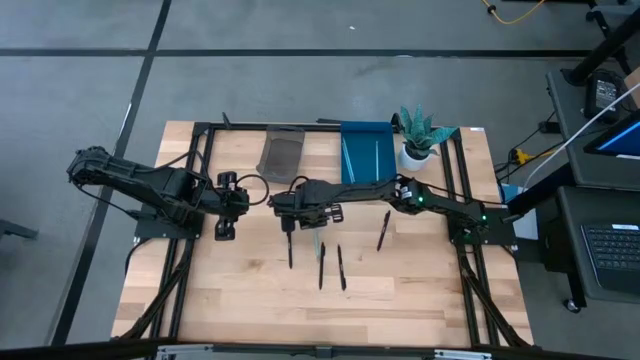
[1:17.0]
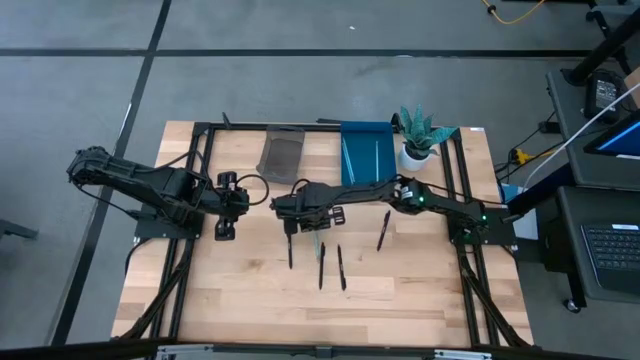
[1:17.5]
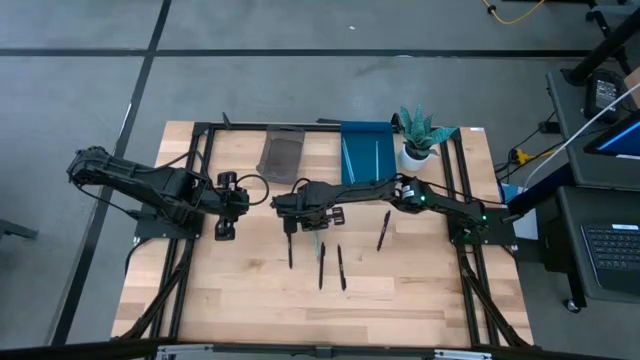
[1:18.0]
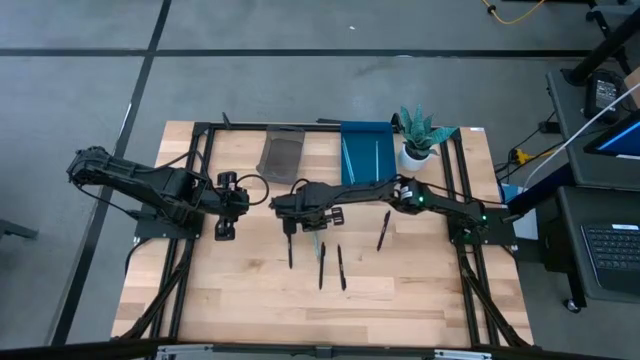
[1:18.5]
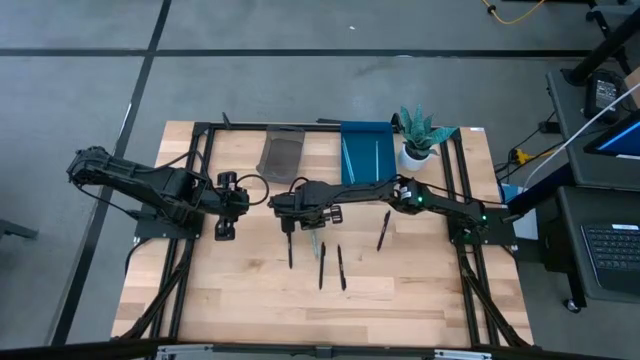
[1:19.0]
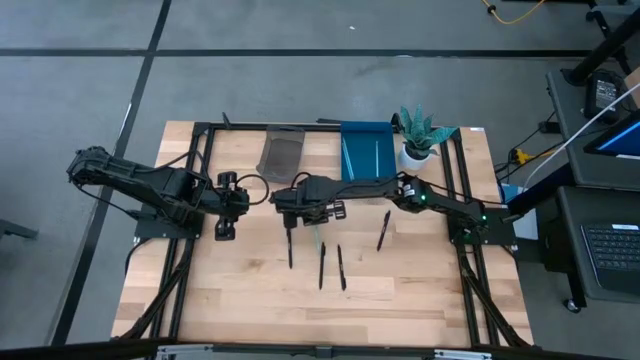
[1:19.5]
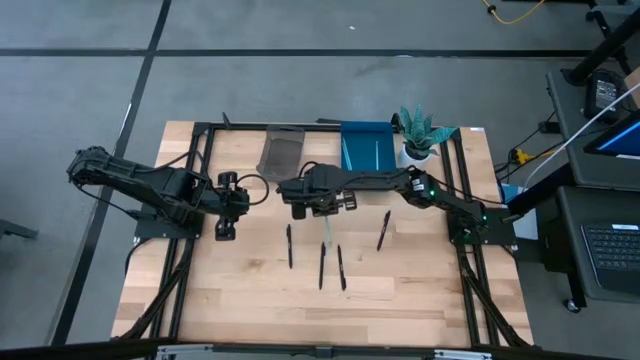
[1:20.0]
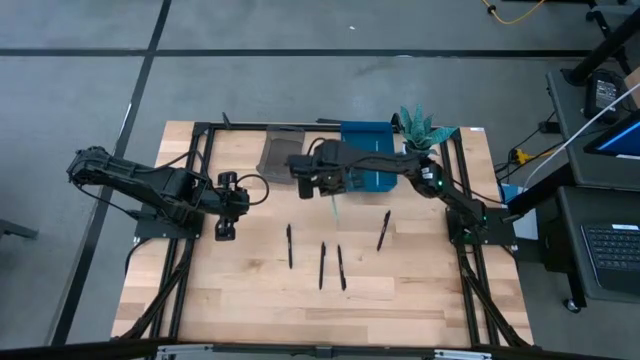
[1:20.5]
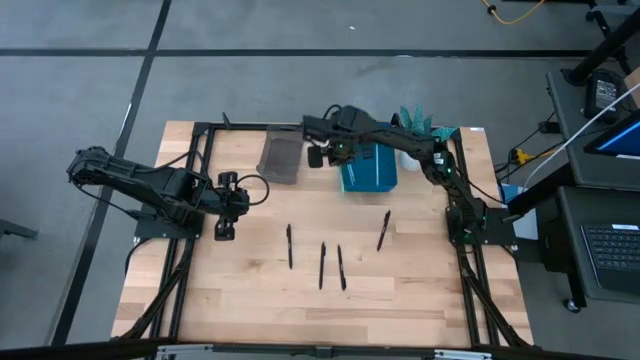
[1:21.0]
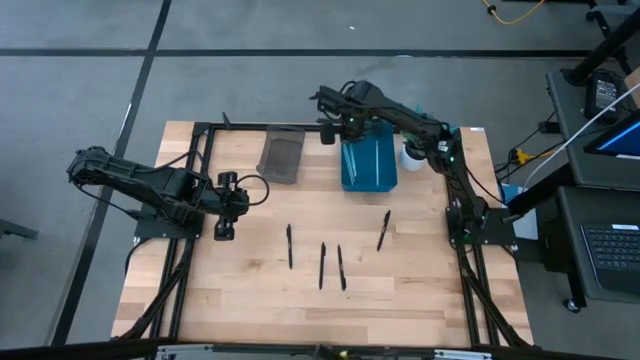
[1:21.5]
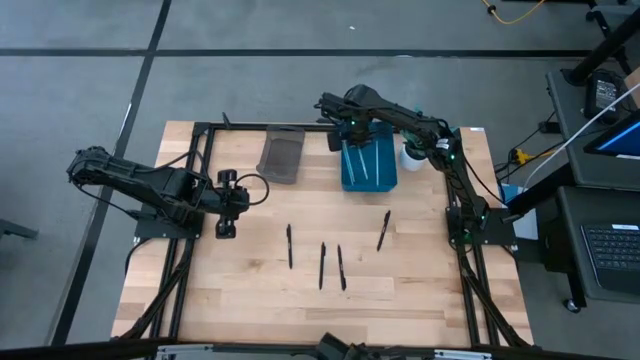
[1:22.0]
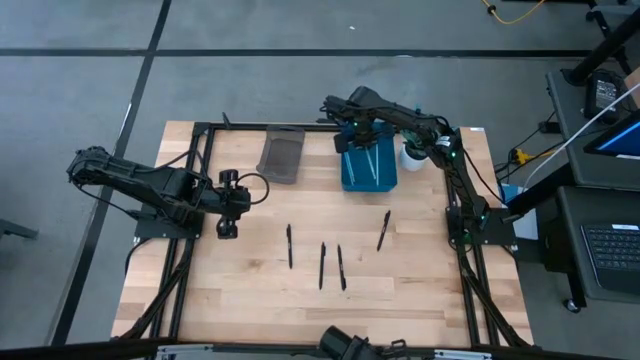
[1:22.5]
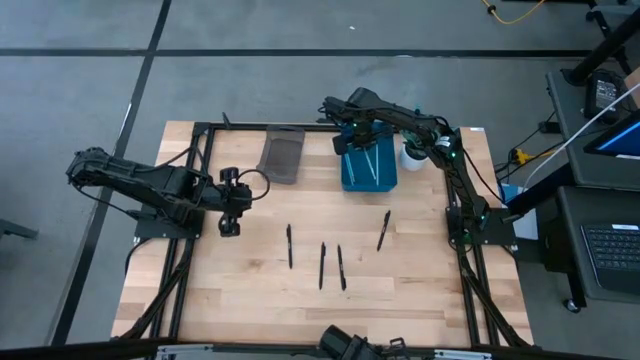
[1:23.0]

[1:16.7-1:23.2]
Task: Sort pens & pencils
Put the light blue pencil into the blue bin

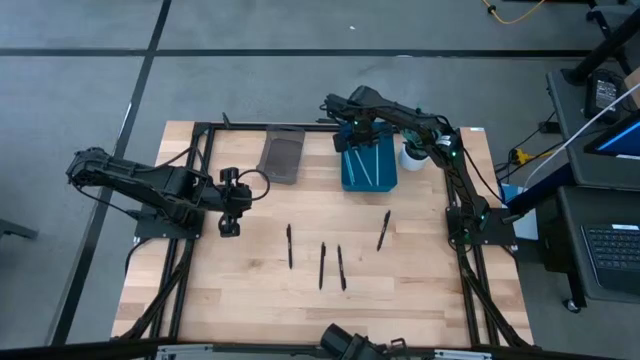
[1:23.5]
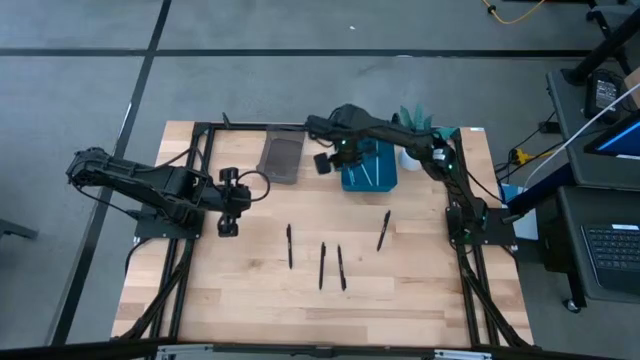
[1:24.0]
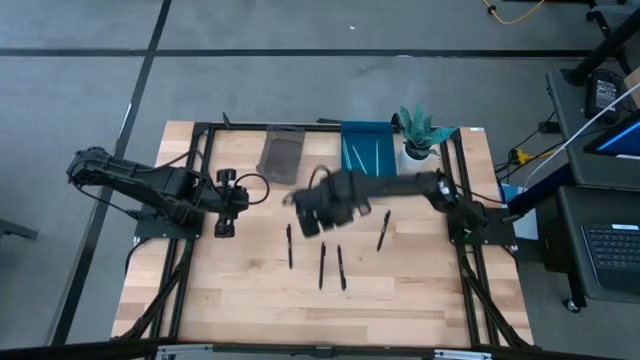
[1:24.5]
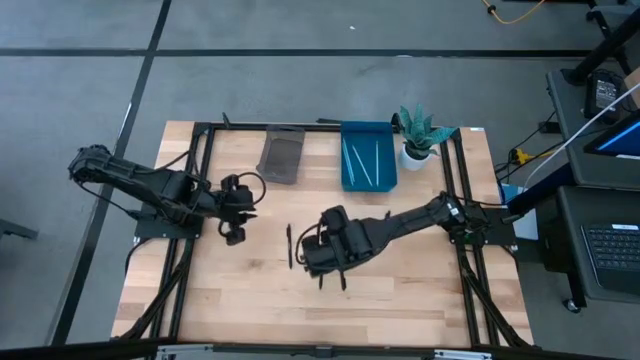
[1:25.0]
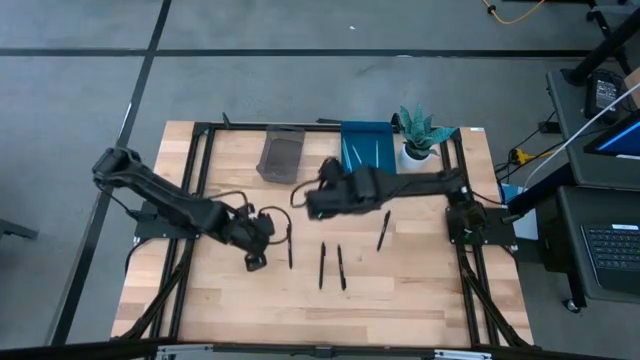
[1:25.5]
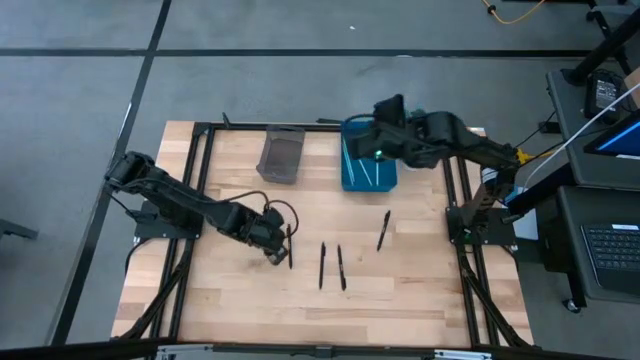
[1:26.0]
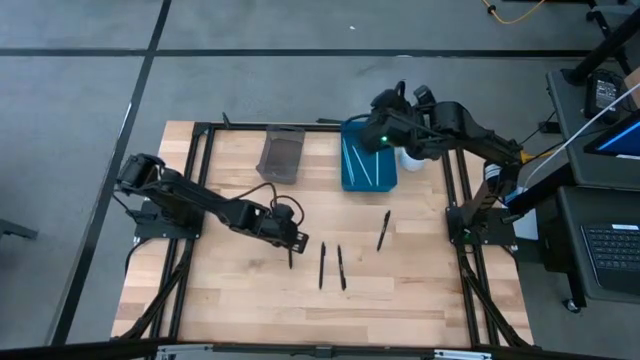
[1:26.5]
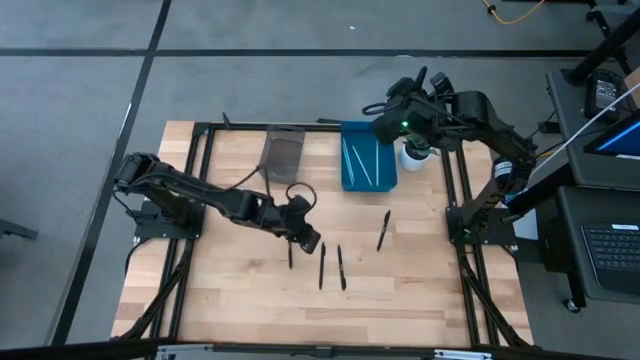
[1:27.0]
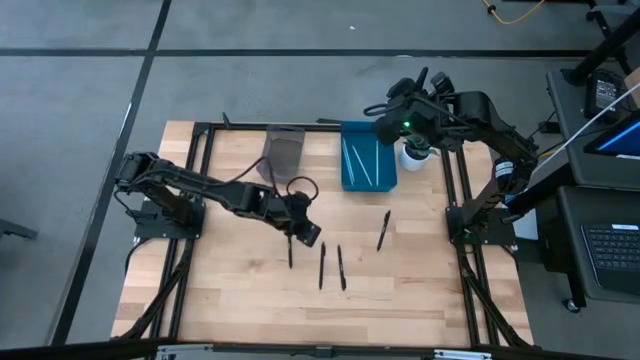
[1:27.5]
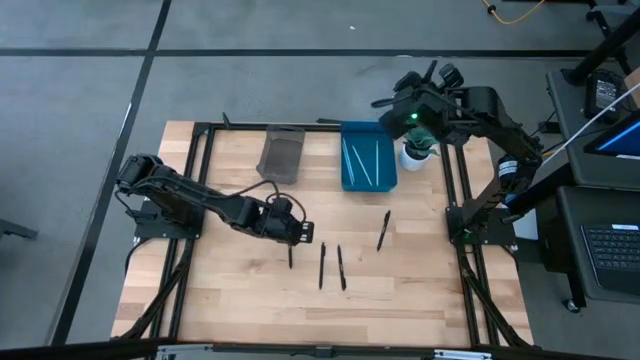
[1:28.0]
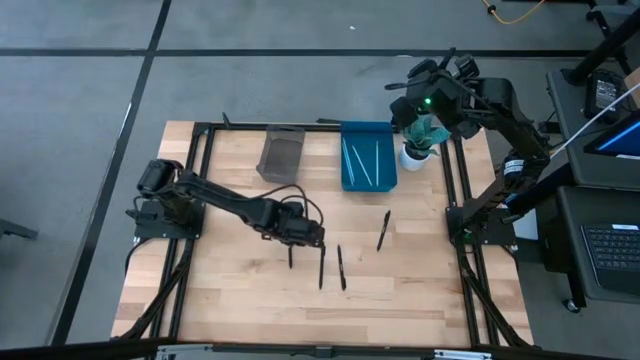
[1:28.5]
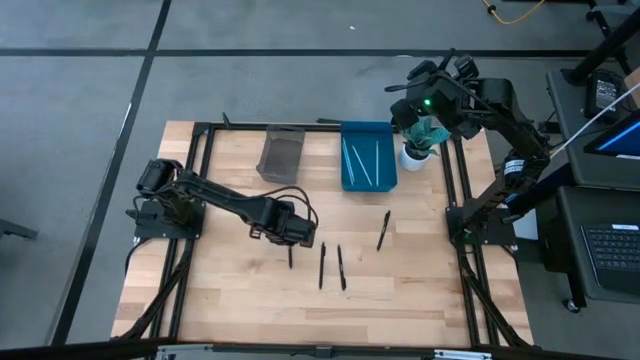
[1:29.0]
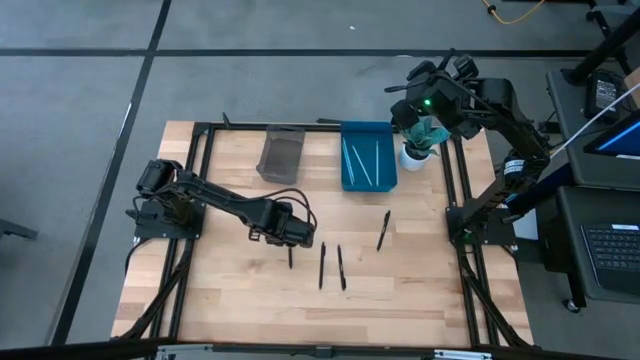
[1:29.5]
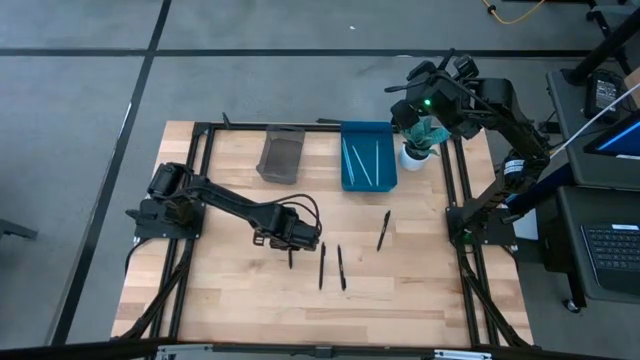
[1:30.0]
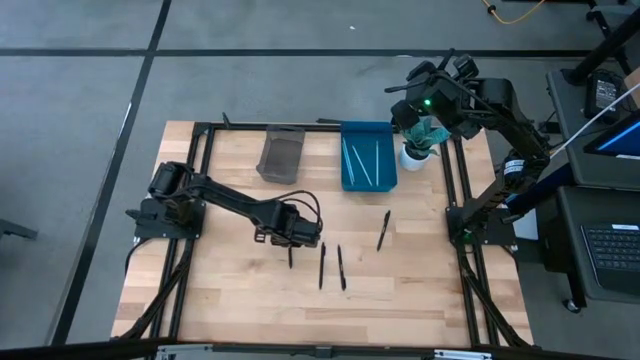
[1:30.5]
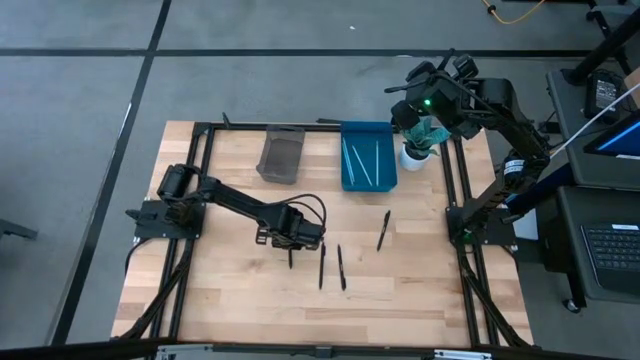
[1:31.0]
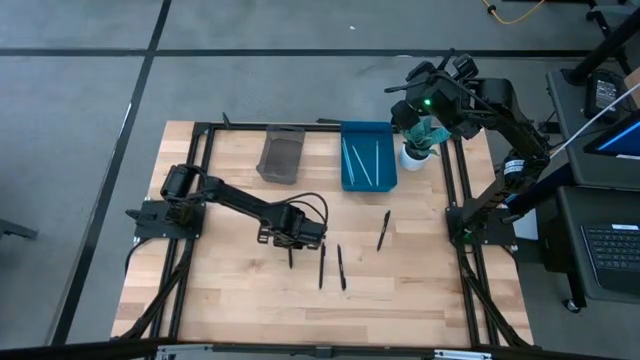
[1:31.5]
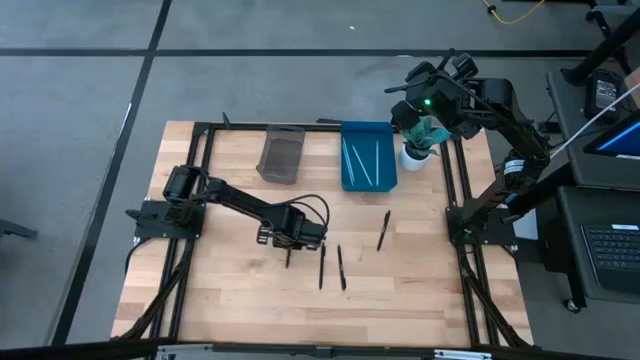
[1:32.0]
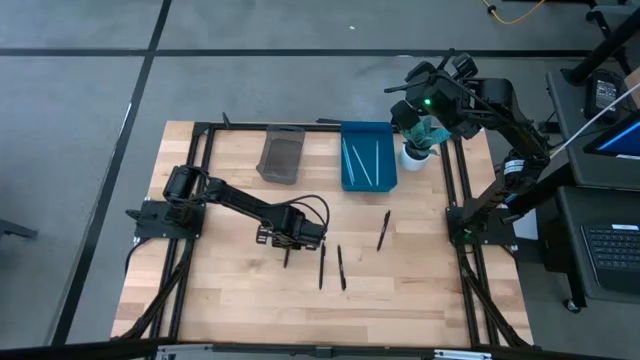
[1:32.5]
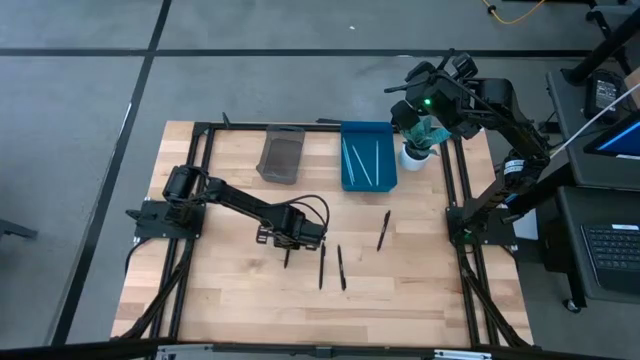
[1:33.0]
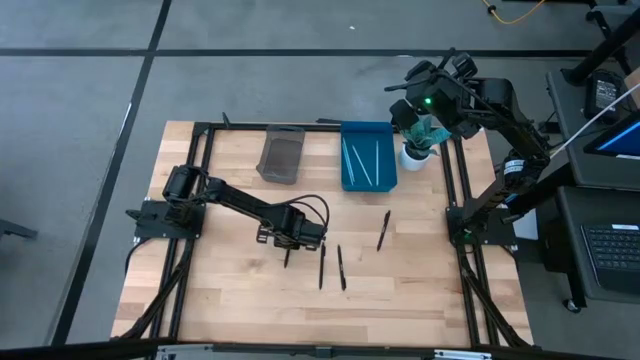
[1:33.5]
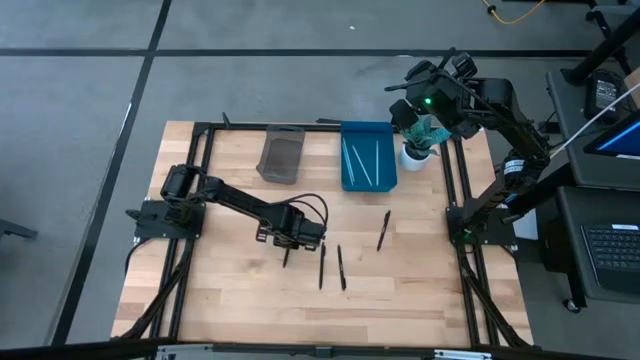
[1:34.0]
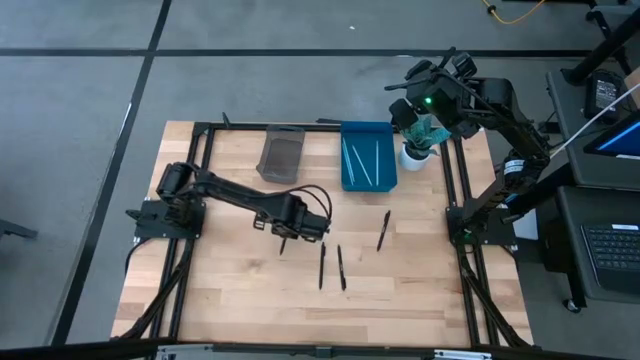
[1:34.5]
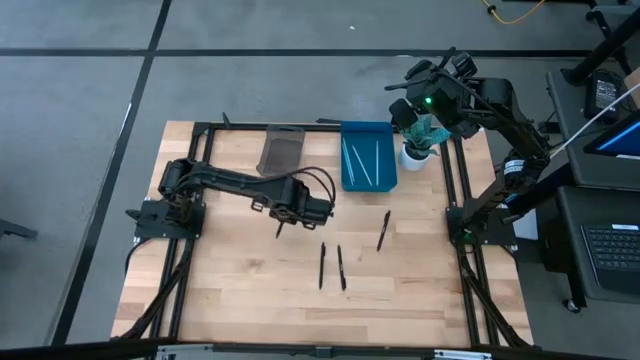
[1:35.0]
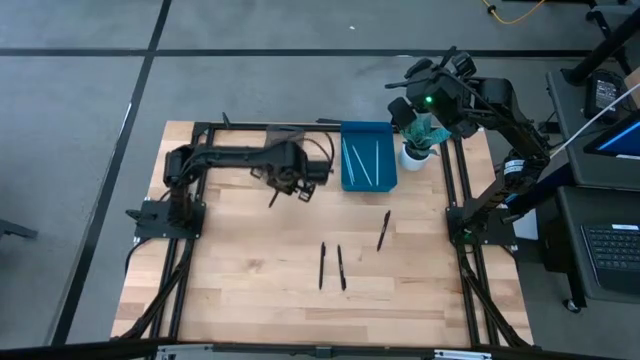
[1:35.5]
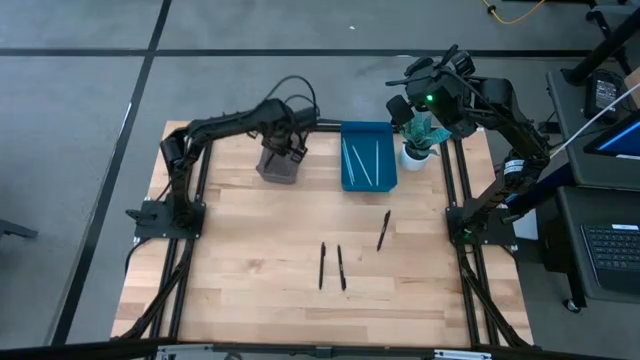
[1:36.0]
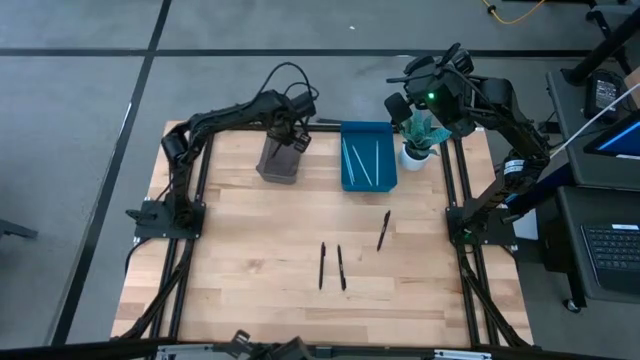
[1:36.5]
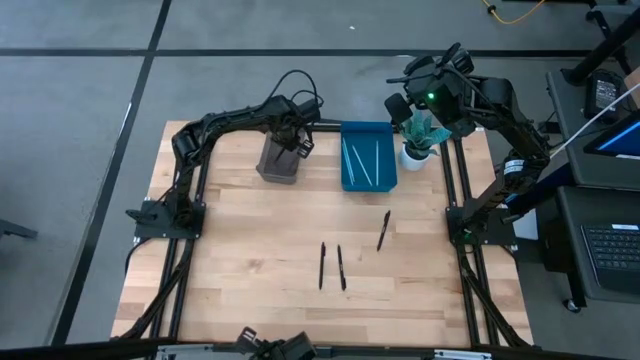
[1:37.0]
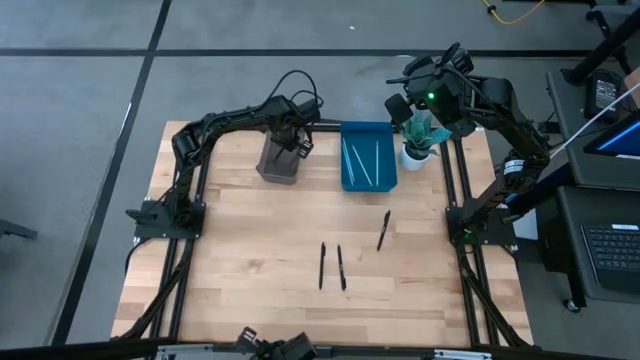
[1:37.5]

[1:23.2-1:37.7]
Put the left black pen into the gray bin
